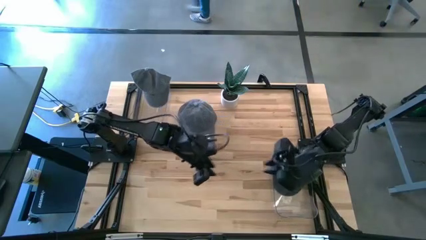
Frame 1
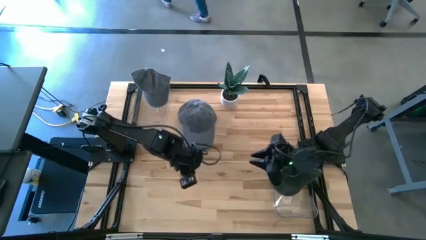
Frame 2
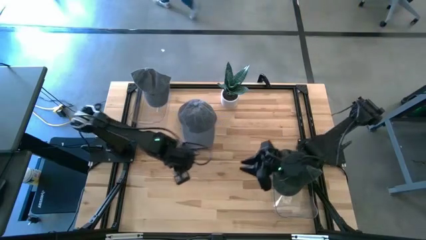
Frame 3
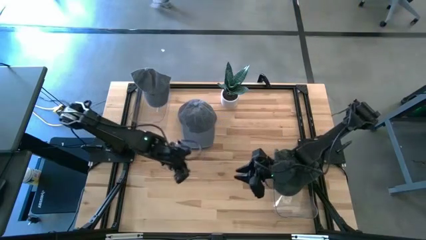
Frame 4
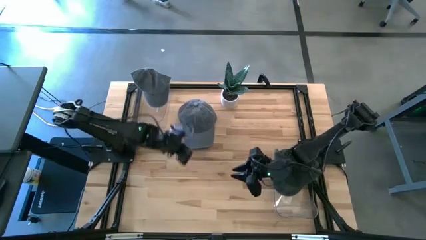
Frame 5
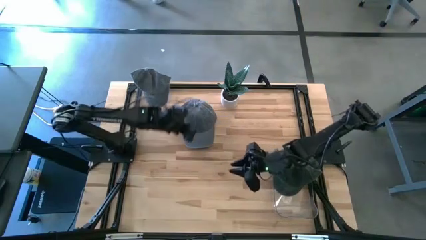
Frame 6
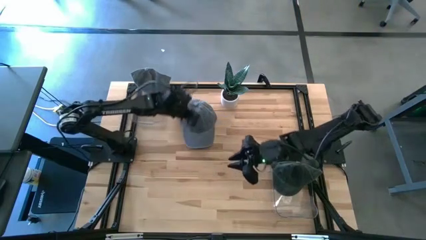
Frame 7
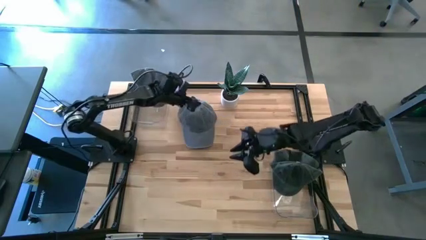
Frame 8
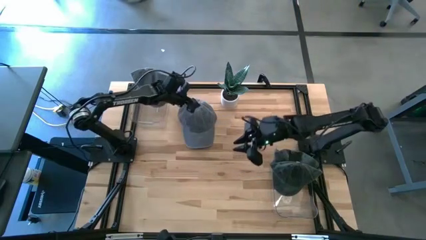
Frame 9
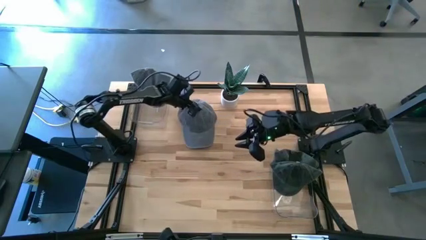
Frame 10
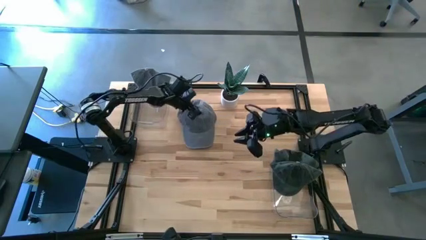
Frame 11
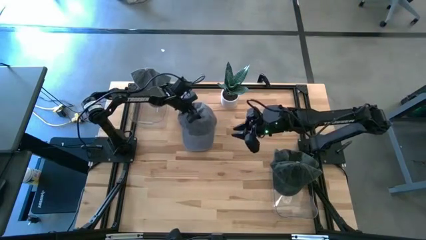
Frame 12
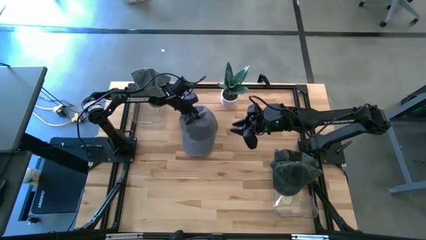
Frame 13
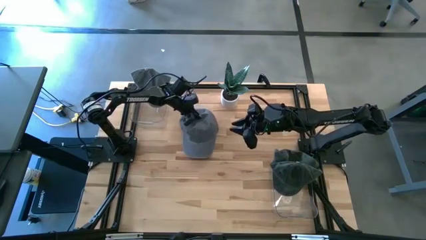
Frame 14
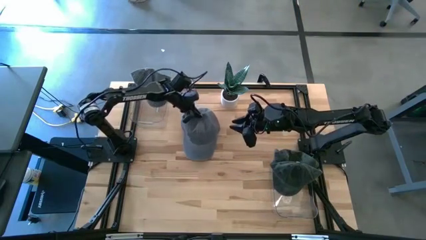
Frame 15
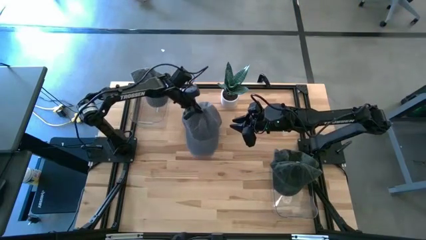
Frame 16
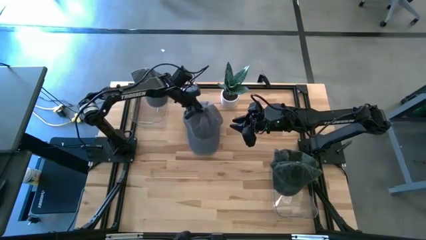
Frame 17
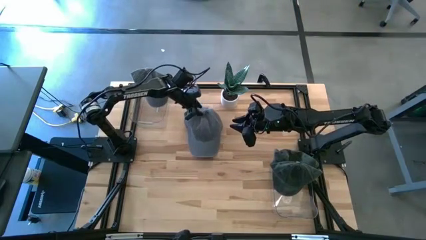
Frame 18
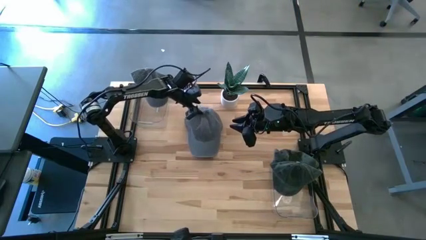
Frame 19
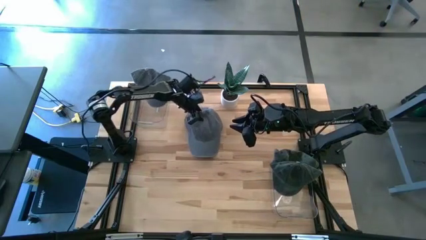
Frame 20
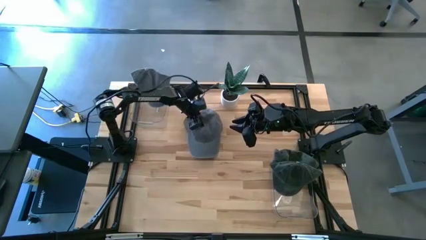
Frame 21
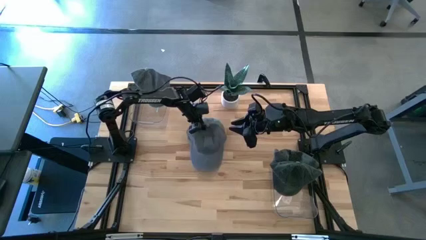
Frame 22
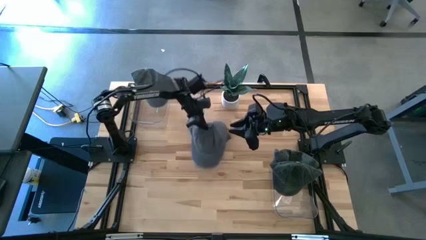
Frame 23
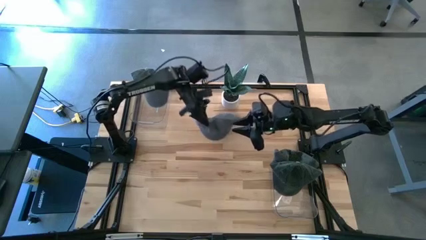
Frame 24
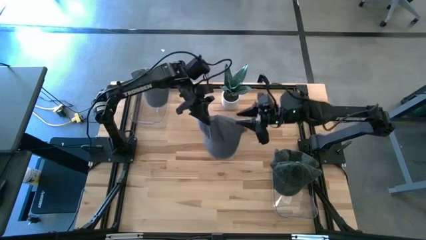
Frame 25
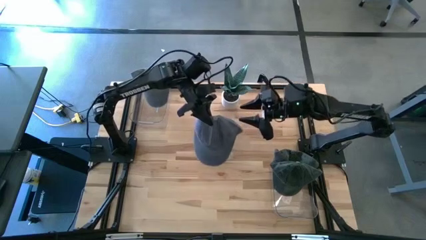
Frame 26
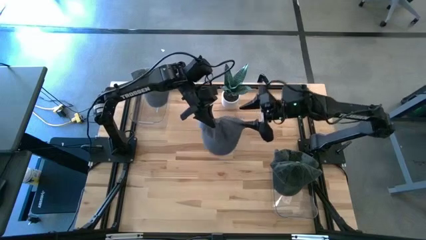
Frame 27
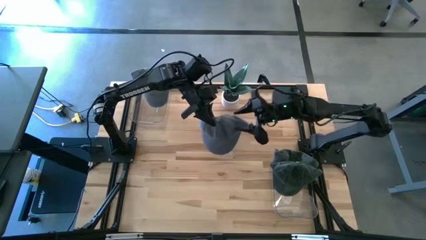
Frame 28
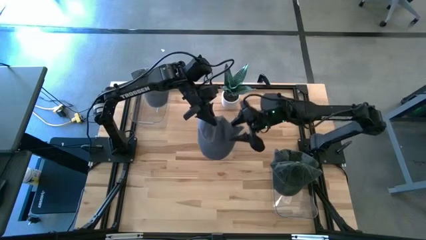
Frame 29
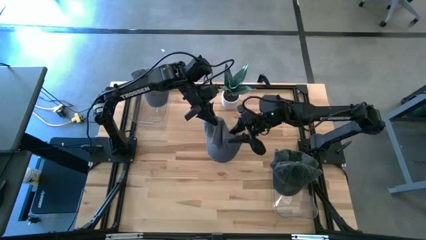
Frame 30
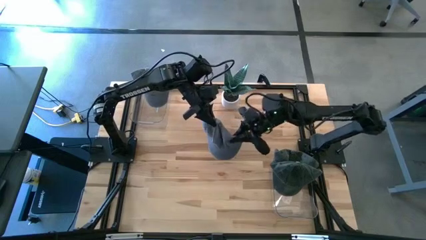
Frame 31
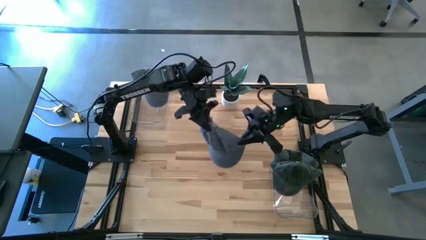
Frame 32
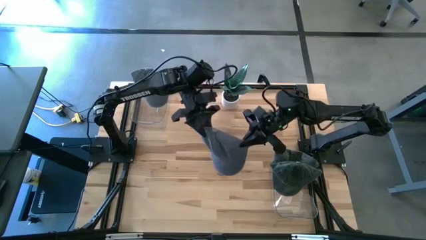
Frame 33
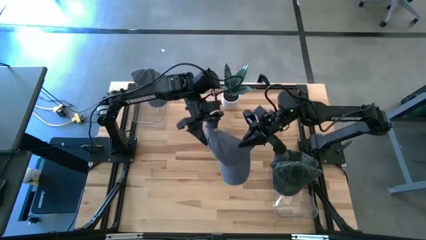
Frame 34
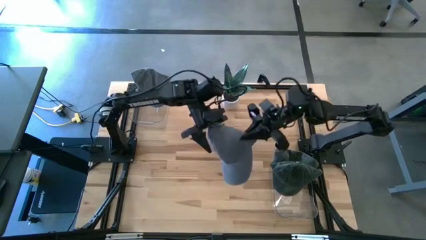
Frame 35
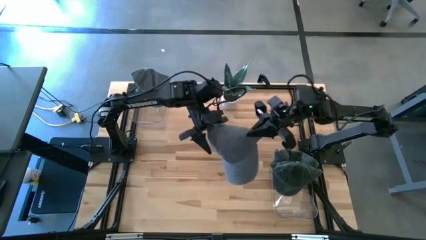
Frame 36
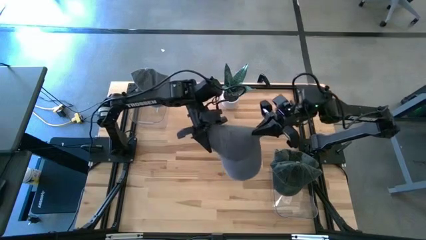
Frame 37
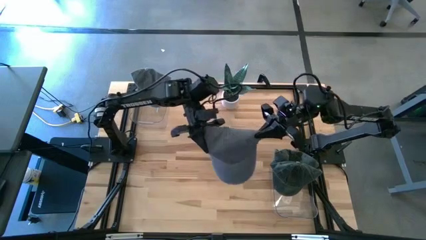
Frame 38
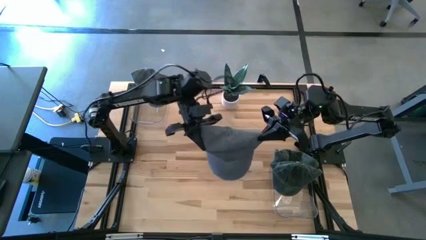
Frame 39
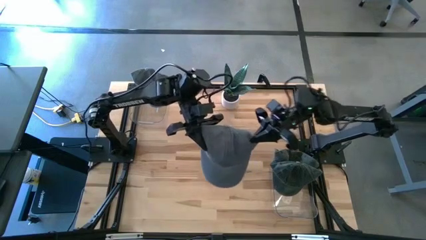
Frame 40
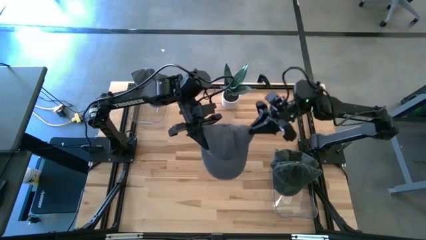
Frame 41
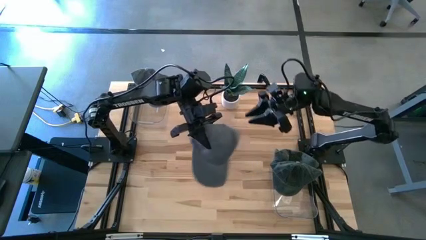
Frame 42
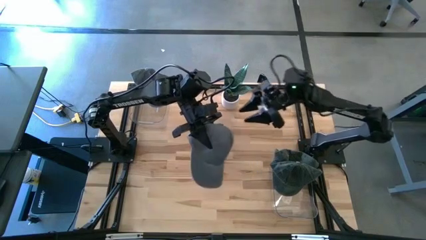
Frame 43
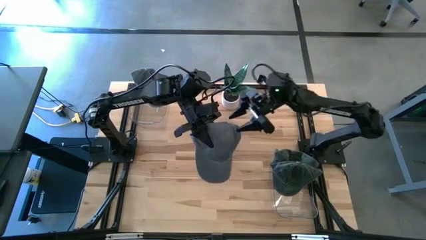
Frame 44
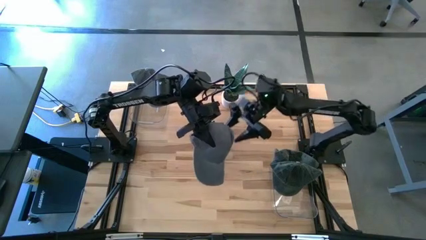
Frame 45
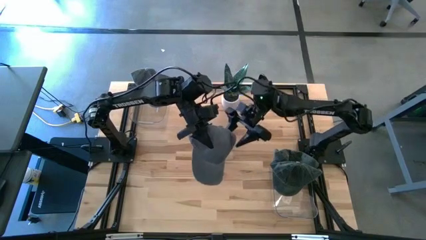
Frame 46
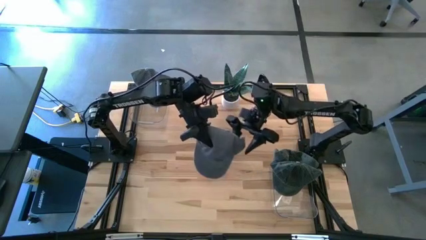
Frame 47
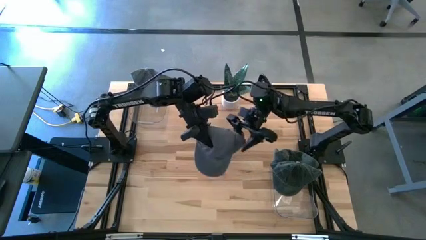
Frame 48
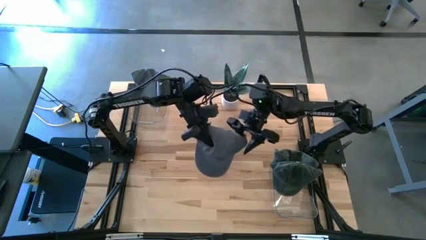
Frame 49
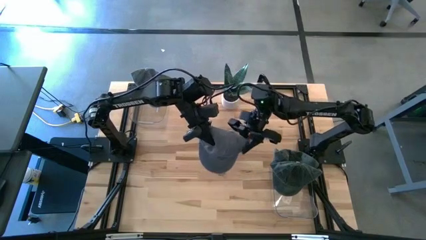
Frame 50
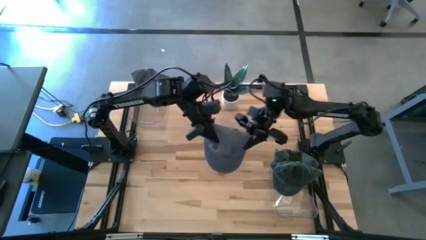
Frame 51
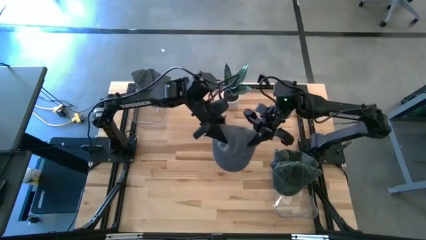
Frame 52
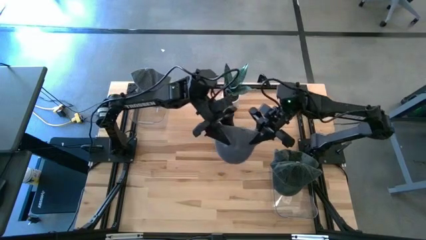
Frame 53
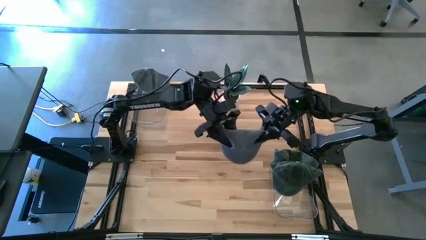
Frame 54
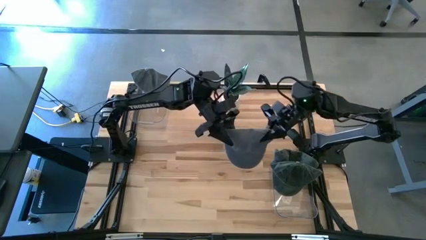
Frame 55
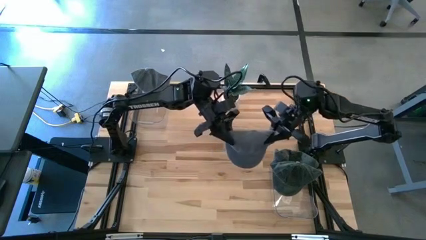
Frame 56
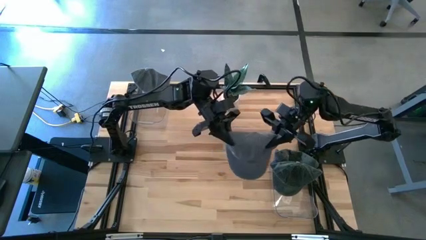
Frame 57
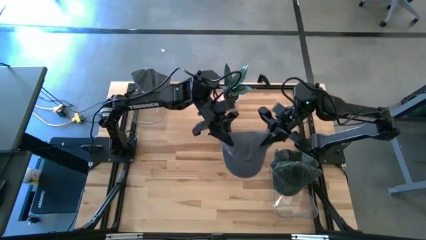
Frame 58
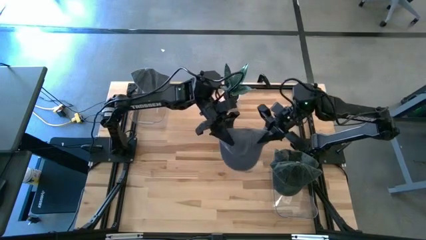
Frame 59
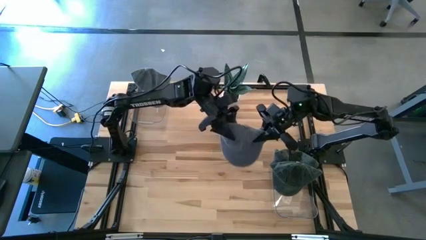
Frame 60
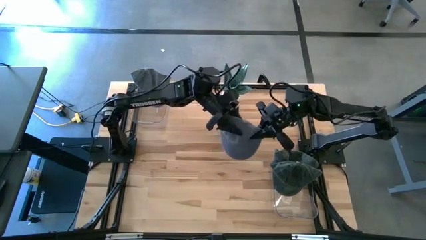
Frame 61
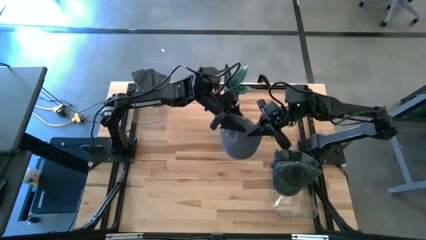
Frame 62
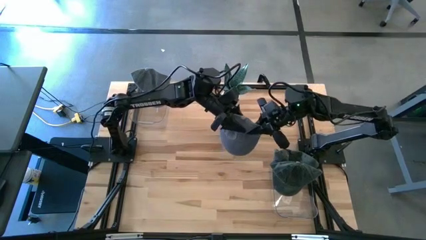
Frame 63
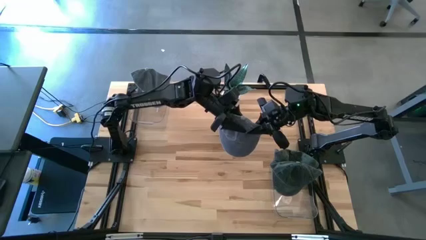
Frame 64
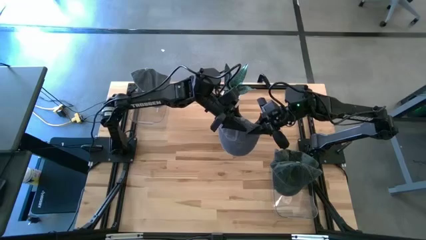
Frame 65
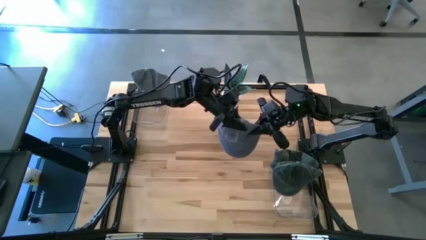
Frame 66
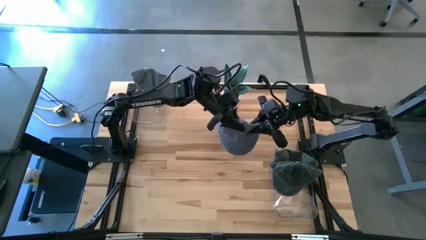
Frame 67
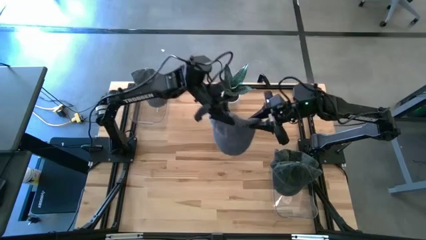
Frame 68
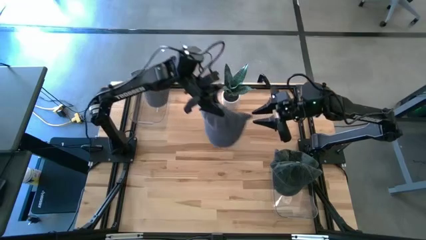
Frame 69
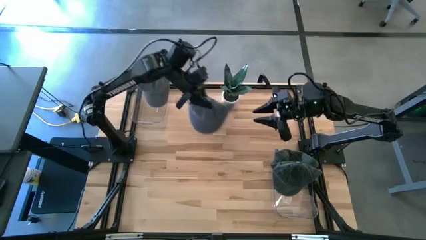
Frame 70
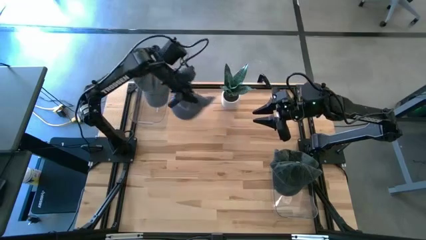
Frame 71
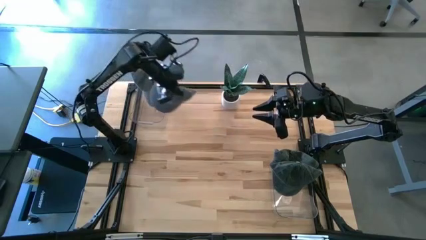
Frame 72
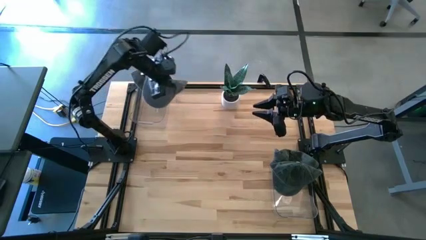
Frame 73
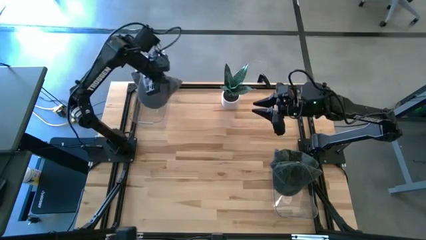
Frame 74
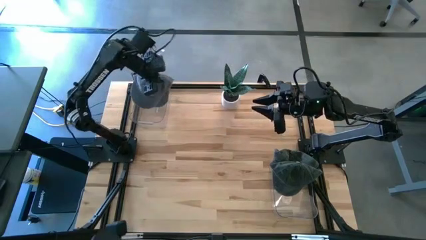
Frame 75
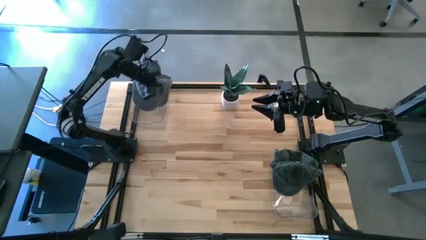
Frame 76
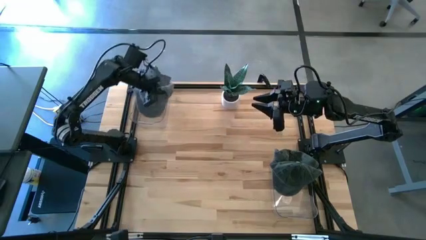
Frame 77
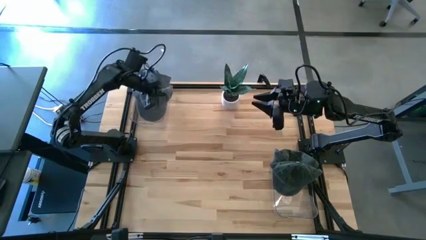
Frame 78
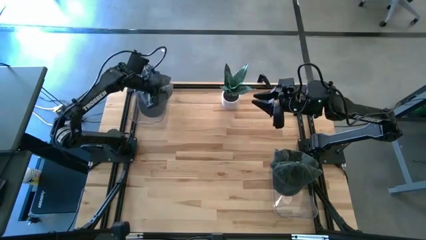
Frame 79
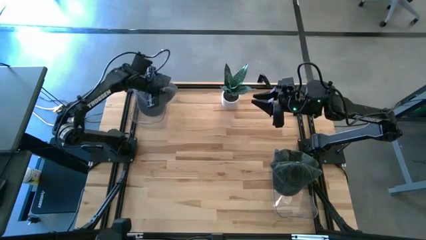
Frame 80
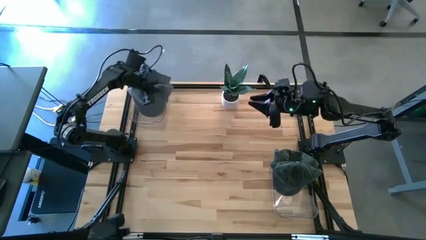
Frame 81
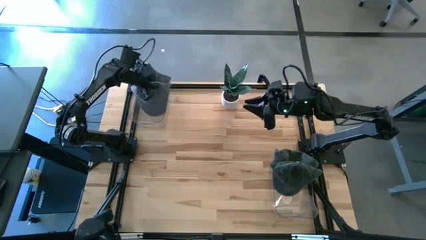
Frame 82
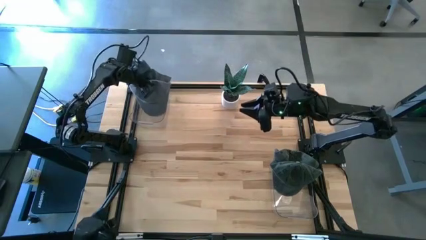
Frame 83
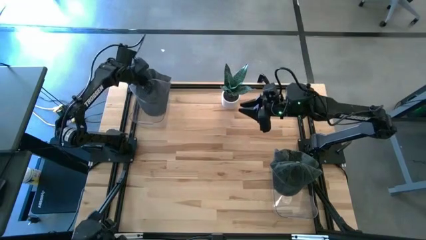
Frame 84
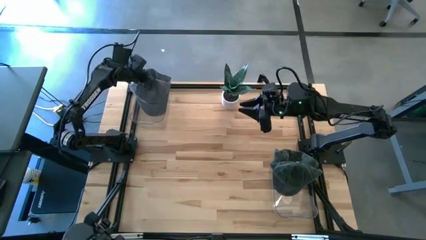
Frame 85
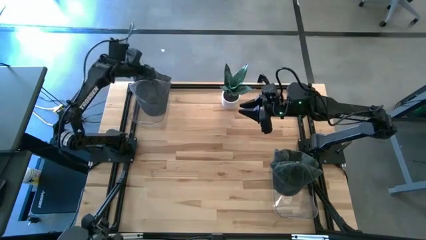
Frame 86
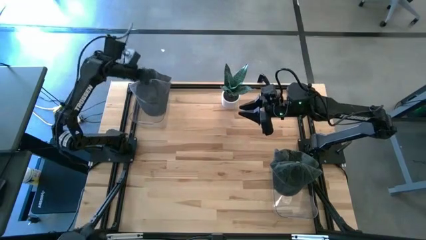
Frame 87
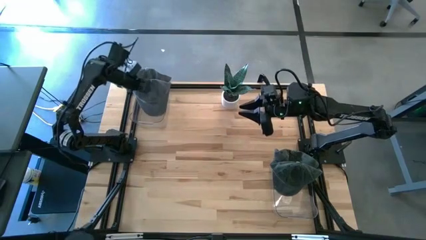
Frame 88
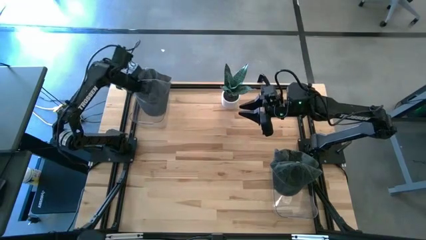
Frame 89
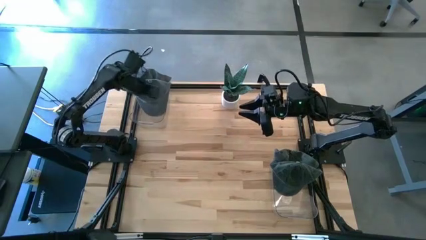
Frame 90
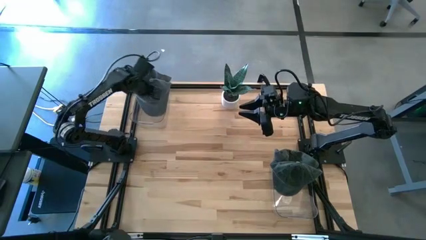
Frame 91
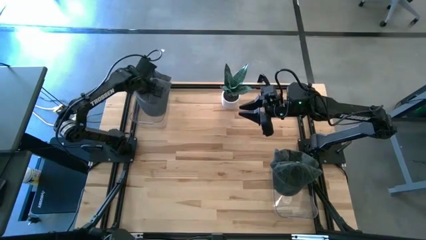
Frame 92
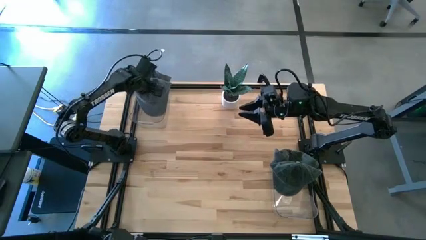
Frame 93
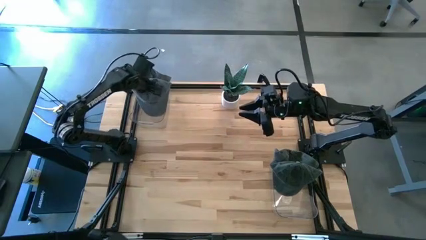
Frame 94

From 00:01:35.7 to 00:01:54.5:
Task: Pick & Place hat
Put the gray cap into the top transparent bin
